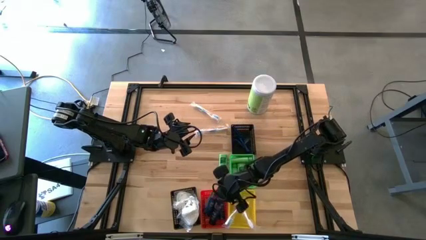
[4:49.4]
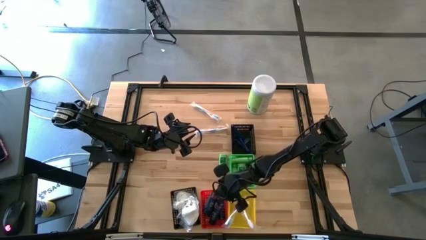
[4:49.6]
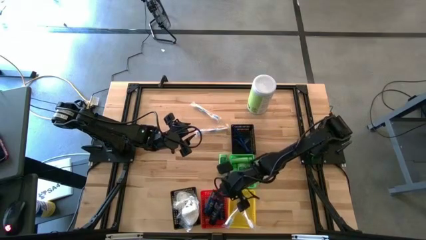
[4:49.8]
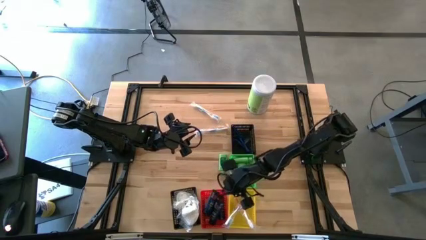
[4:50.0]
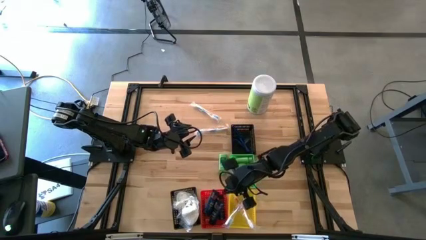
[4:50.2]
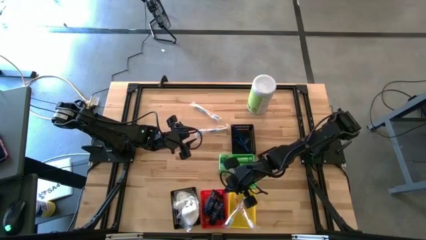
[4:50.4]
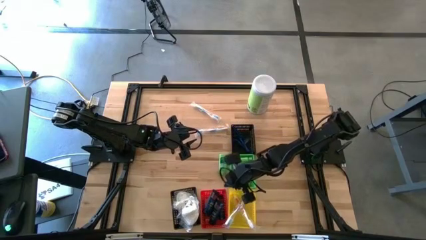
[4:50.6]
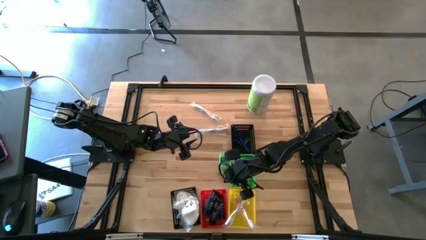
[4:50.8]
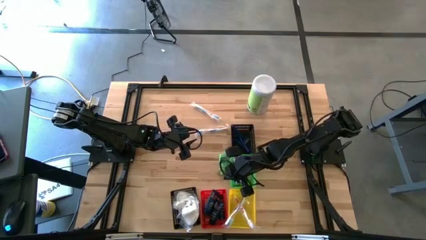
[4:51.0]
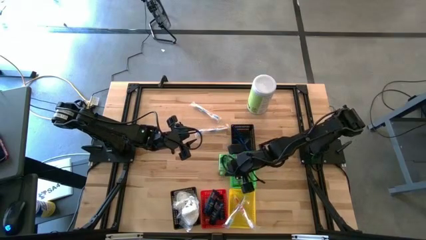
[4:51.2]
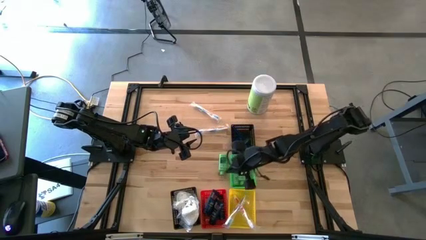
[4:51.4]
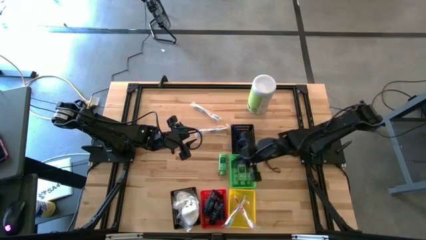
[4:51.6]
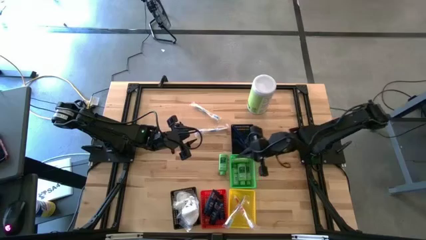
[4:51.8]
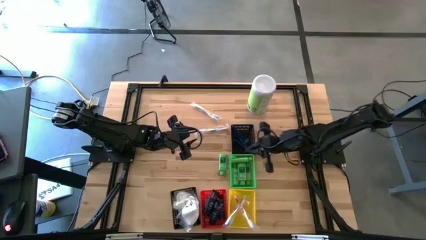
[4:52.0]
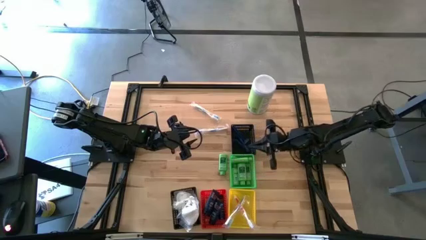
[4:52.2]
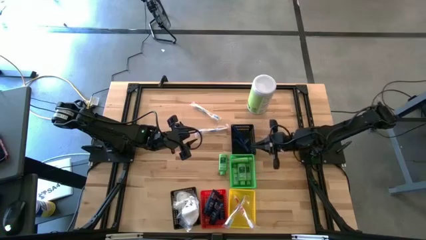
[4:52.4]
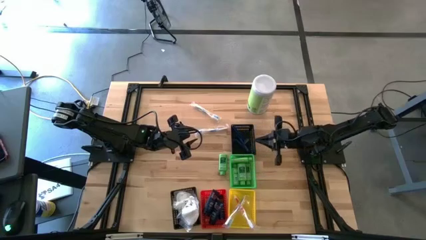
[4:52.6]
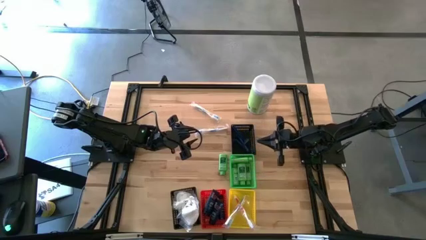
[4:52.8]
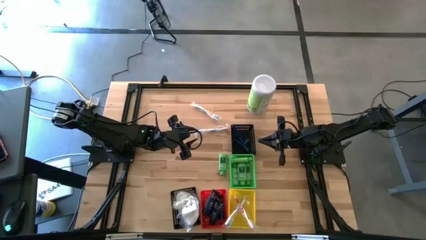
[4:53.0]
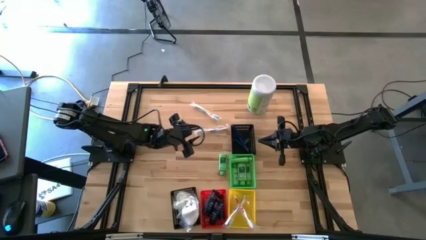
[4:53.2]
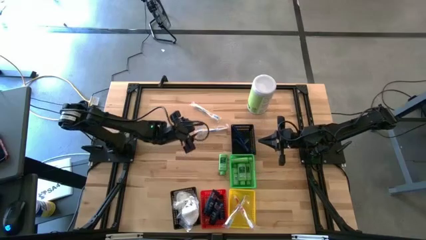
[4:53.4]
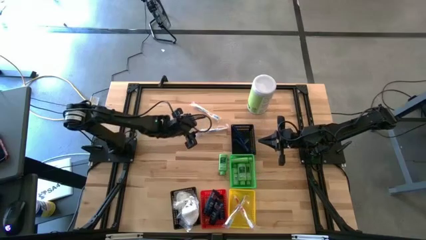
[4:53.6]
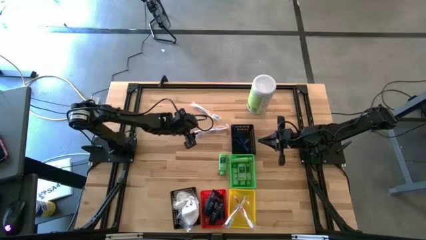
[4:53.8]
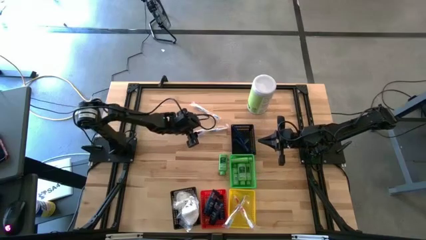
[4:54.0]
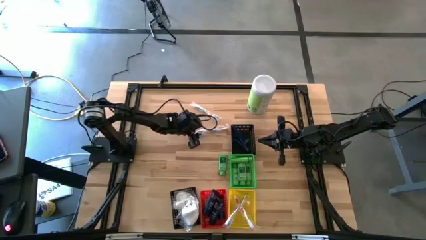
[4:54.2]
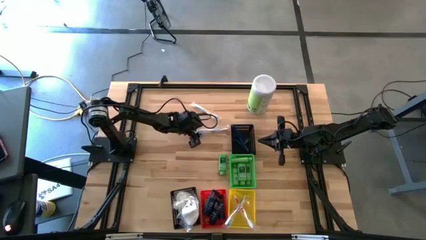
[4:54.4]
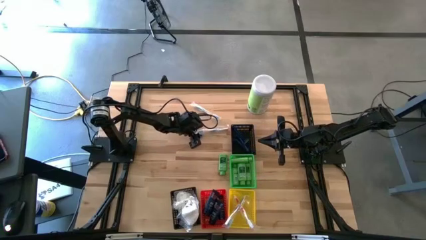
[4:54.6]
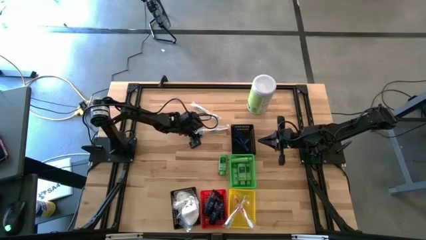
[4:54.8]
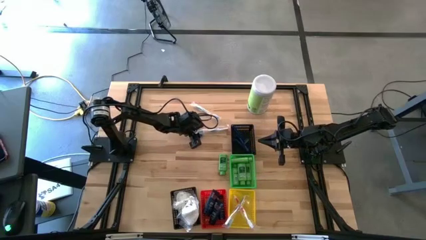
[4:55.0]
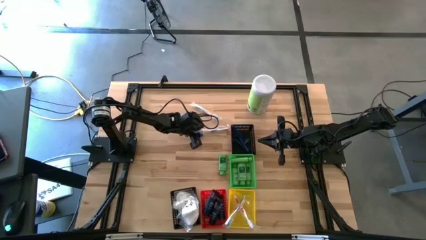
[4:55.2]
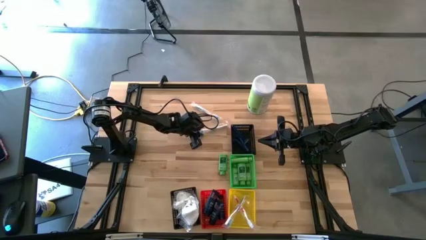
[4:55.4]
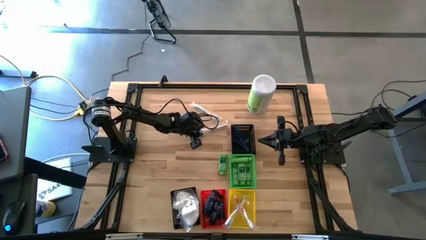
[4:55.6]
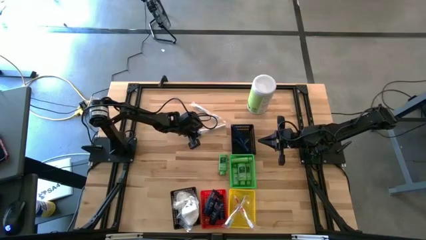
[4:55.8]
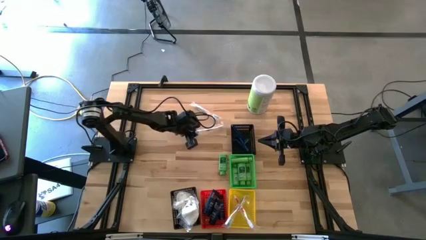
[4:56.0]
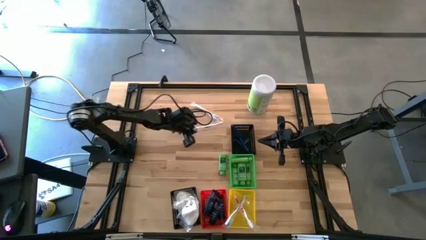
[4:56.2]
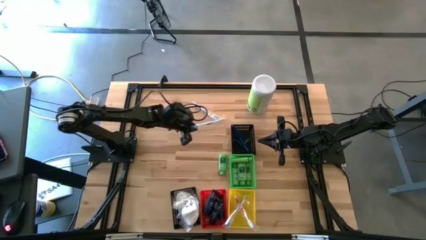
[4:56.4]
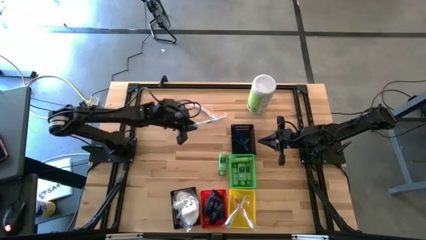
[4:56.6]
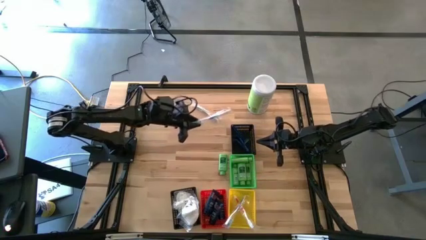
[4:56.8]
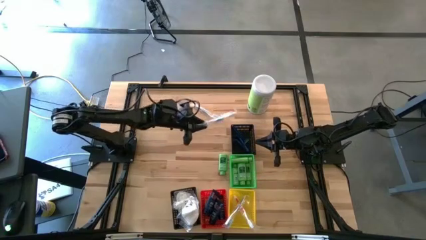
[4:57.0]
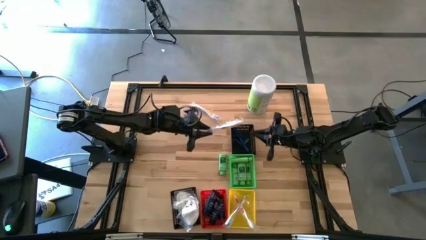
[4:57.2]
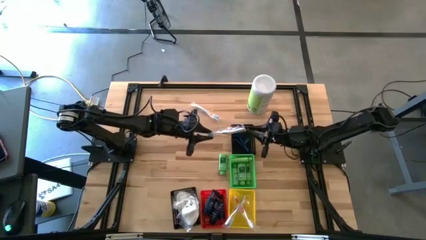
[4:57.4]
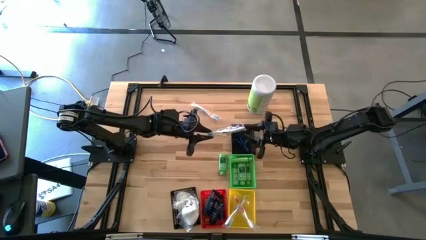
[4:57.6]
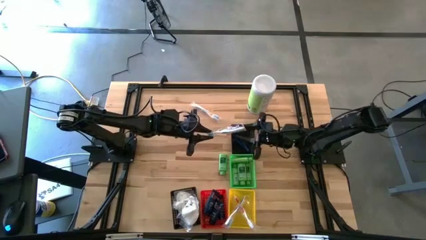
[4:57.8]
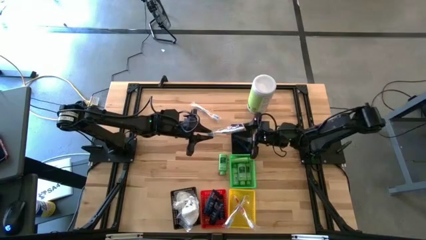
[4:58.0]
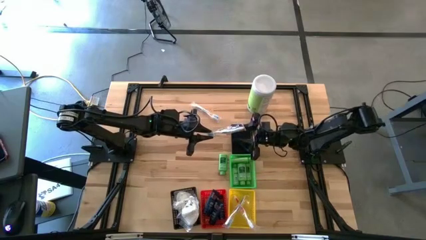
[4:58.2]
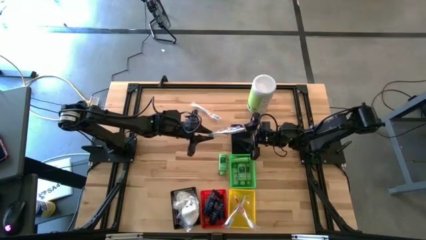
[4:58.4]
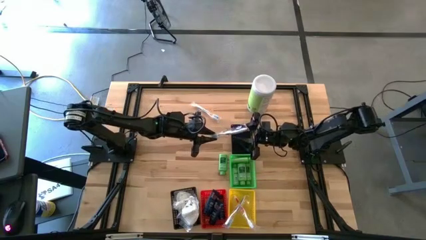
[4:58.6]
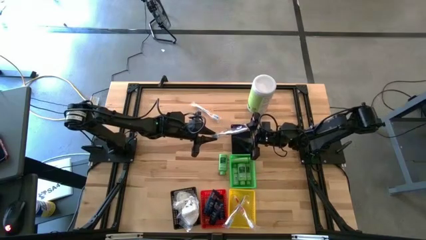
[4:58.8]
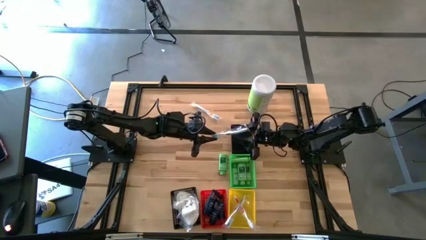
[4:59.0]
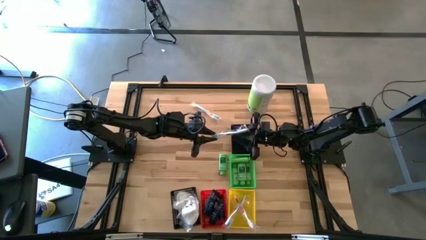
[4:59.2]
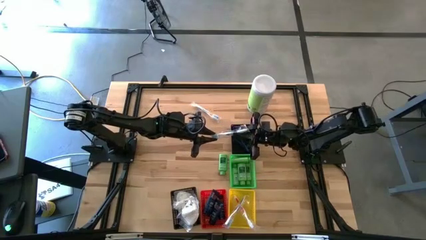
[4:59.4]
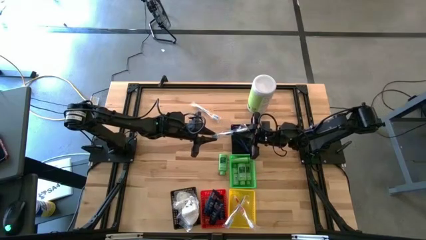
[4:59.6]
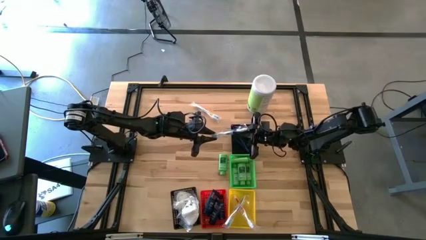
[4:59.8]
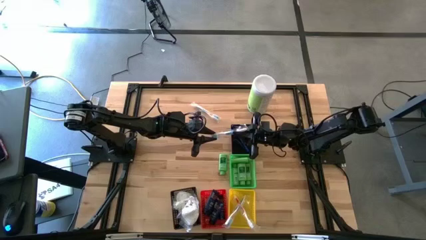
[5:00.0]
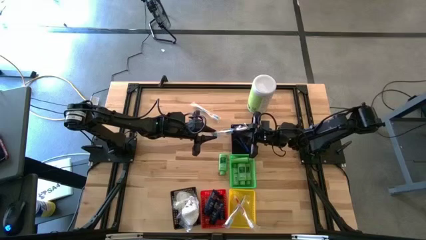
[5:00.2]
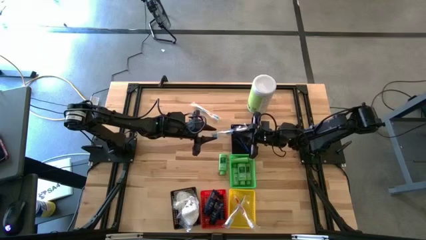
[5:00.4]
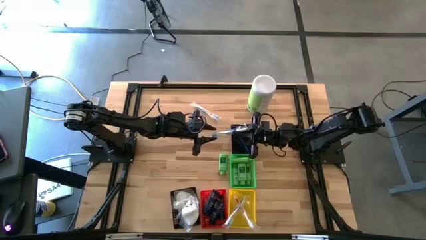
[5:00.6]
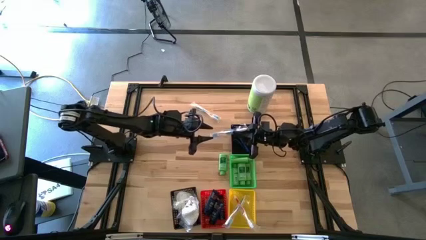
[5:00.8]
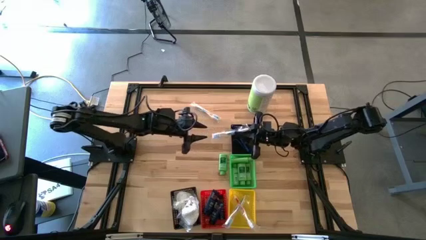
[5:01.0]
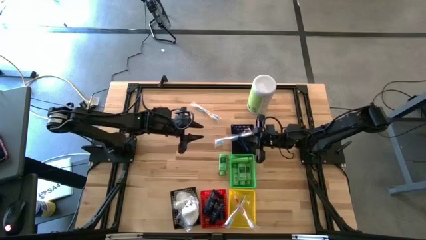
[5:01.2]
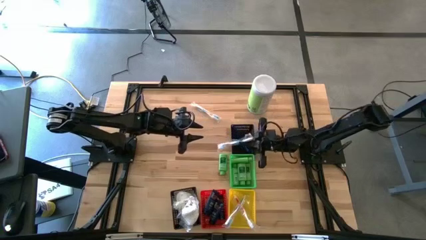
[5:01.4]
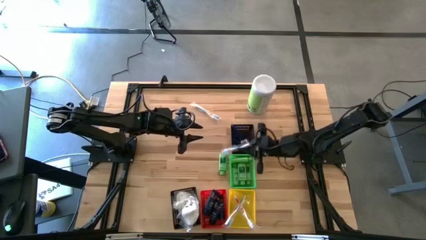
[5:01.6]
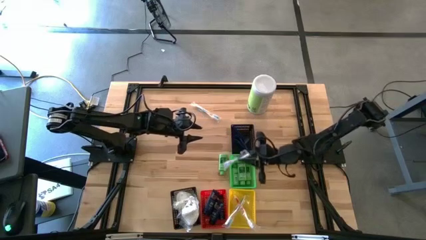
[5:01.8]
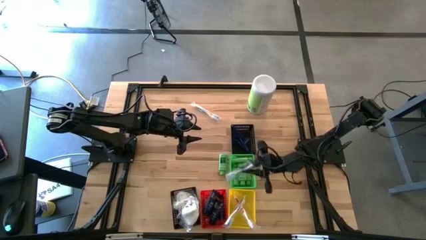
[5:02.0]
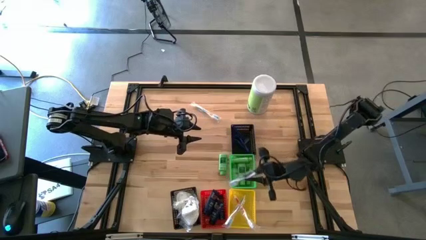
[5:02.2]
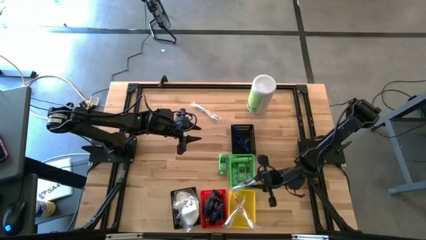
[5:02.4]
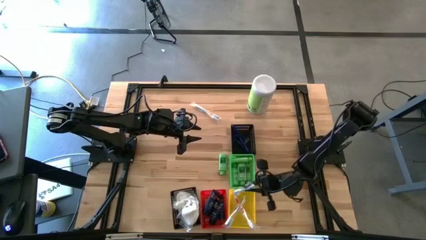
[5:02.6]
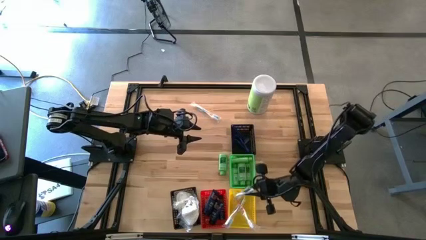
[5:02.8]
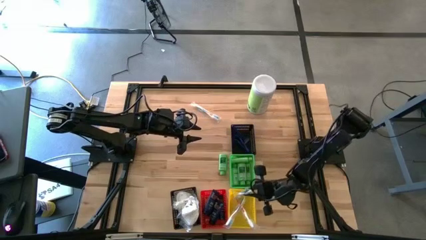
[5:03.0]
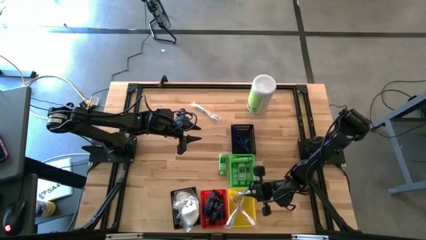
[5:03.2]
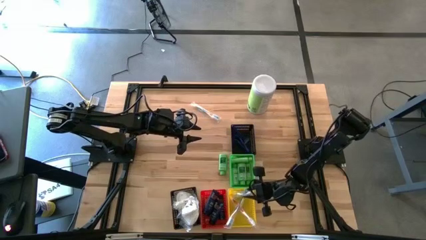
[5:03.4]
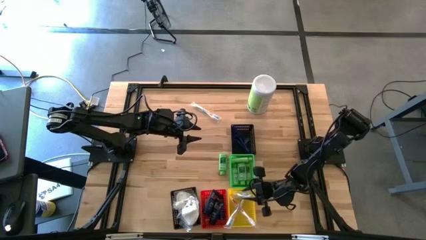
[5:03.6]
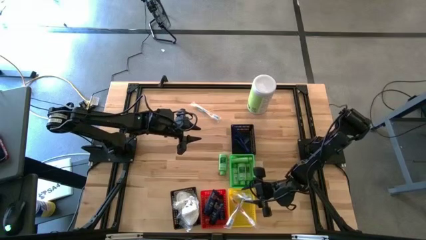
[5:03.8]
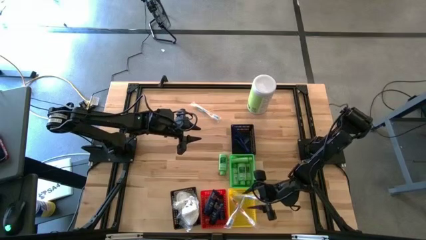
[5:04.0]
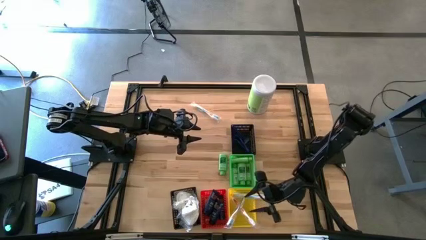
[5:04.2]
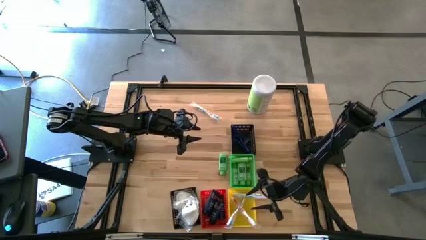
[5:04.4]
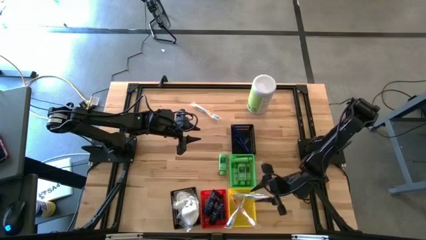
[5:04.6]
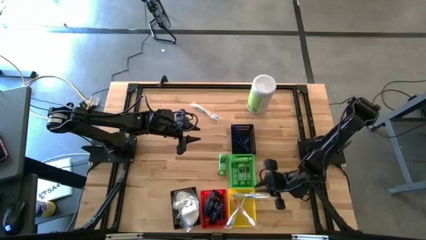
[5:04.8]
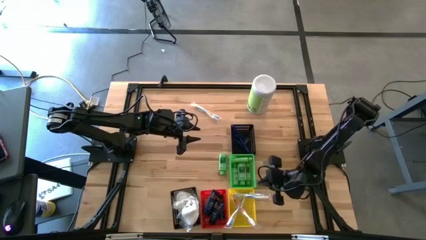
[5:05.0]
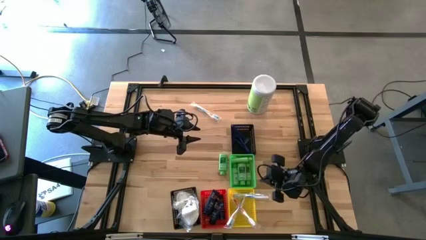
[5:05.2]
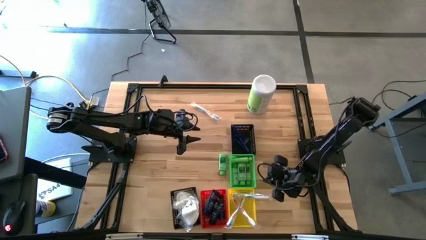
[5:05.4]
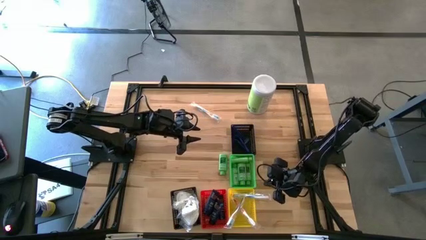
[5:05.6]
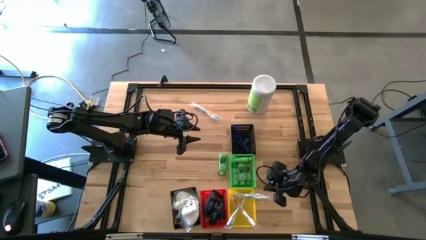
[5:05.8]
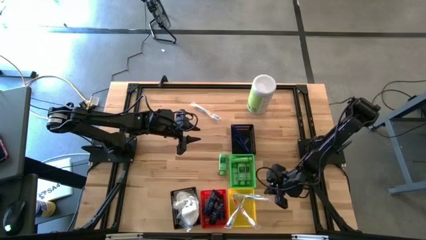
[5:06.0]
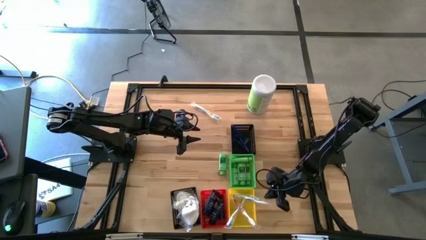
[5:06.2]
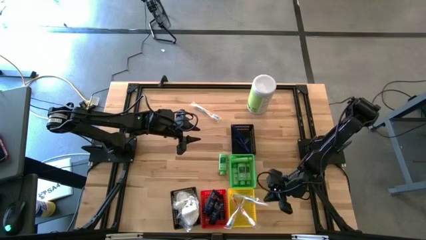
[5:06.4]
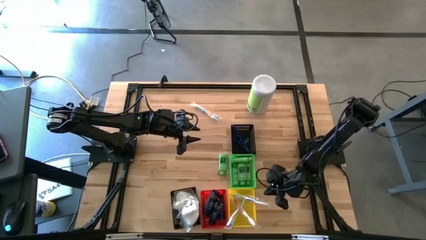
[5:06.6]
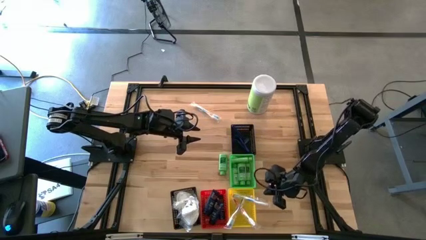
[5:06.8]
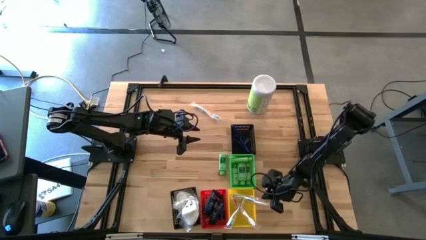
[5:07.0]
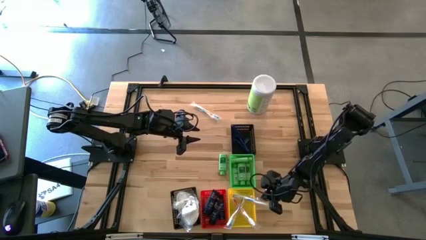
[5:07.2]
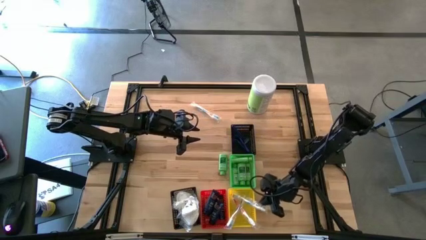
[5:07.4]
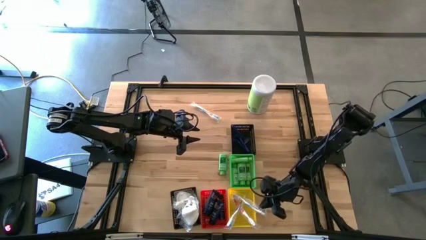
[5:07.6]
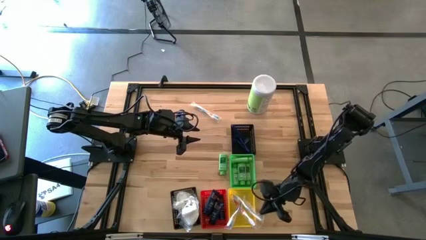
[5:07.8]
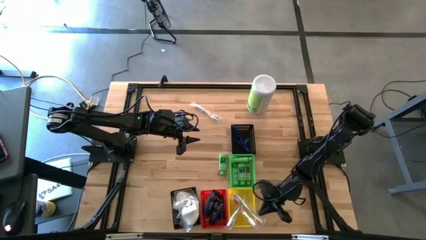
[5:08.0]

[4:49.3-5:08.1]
Task: Pick & Place Travel size toiletries
Put the blue toothbrush into the yellow bin
